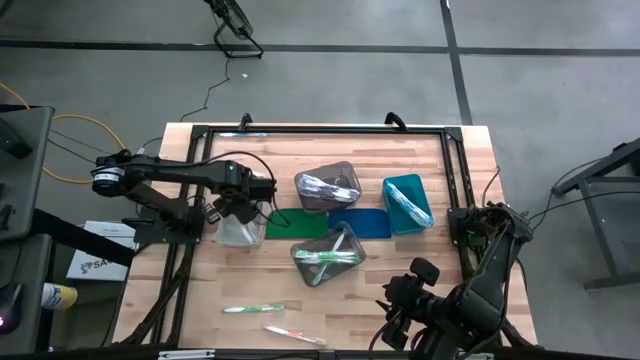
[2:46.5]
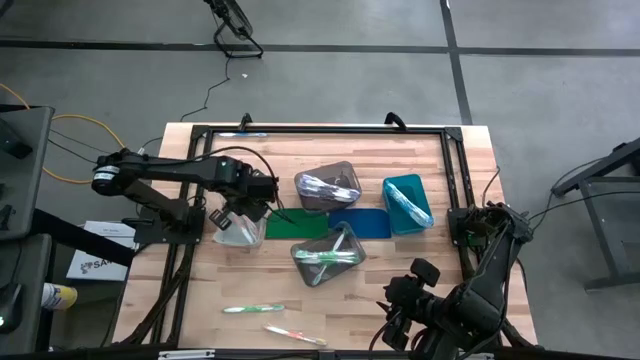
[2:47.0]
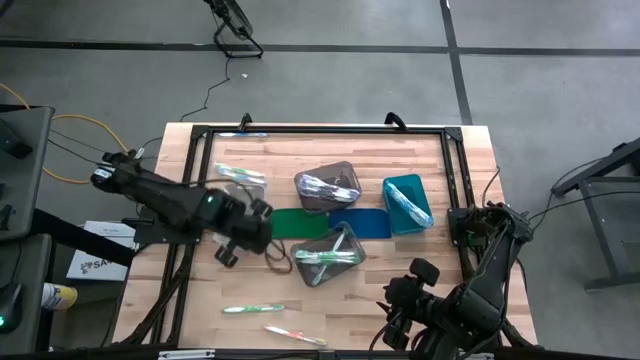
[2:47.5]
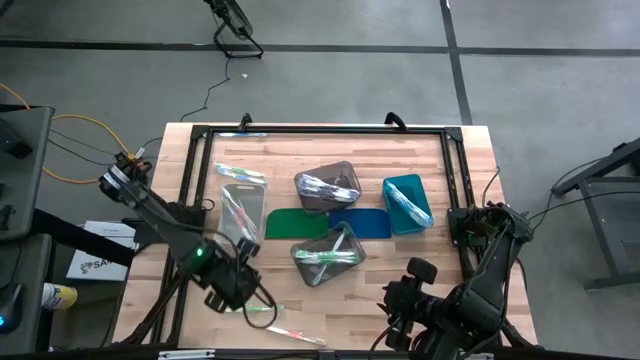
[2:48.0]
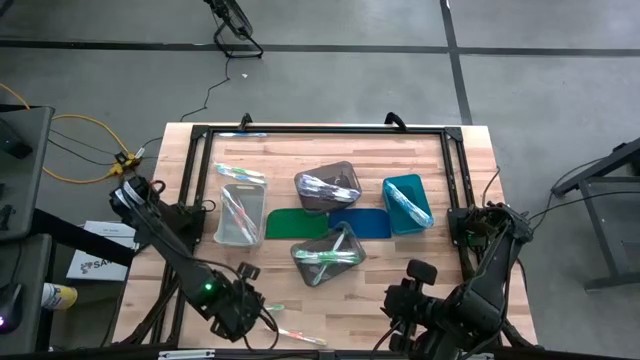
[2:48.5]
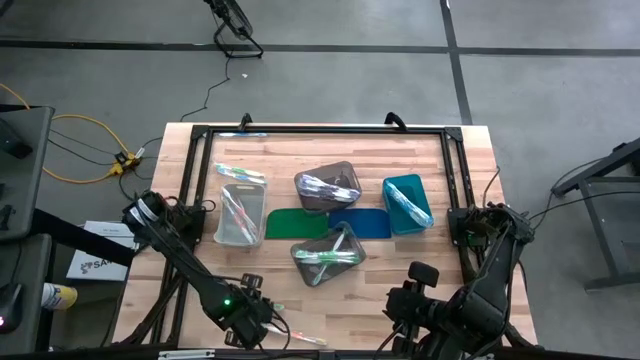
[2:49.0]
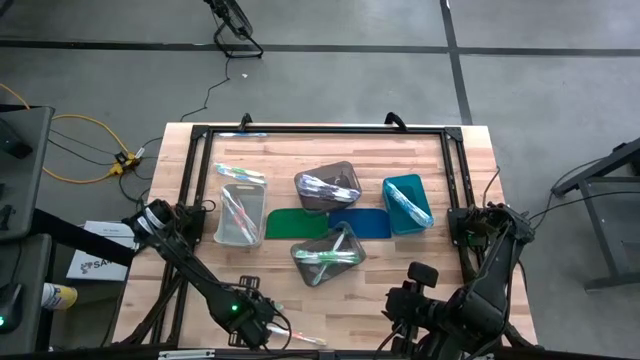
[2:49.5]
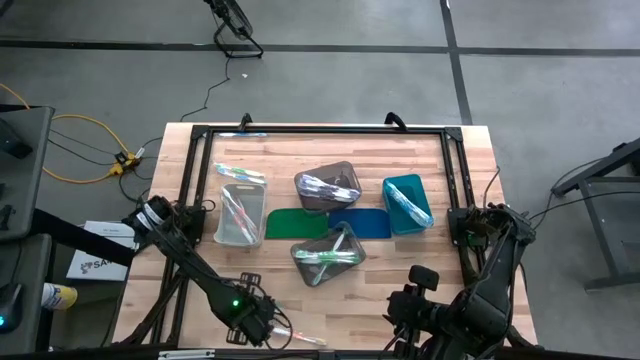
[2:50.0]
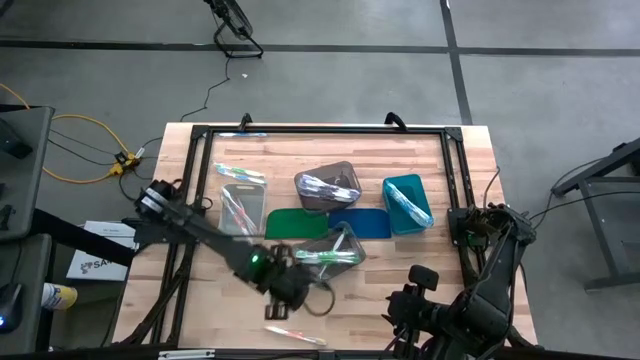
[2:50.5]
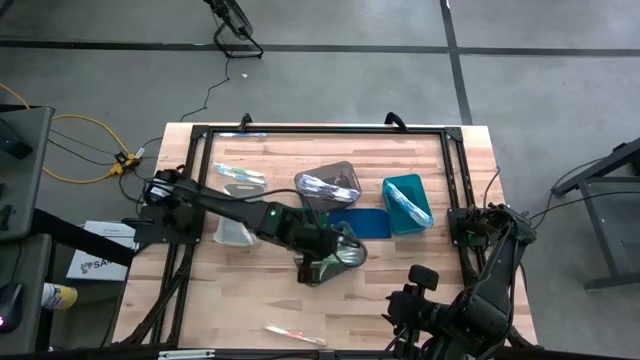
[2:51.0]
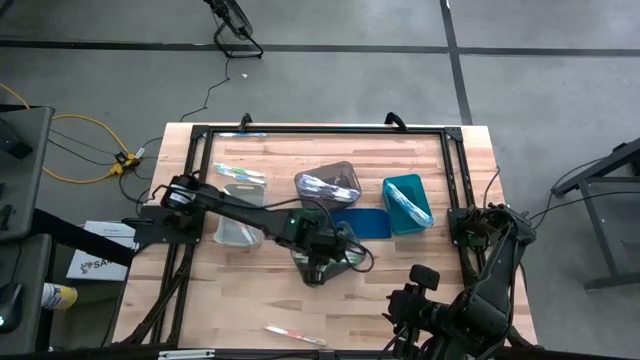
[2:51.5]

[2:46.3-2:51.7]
Task: Pick & Place Toothbrushes
Put the green toothbrush into the bottom black bin

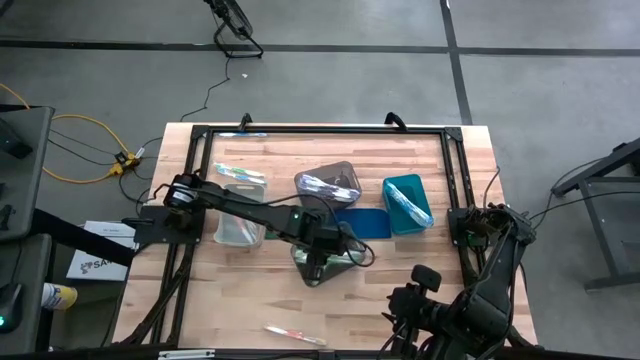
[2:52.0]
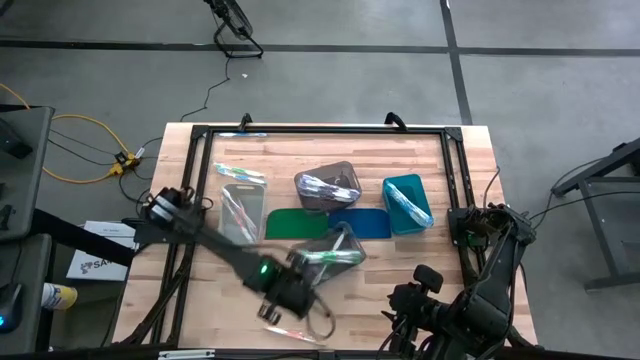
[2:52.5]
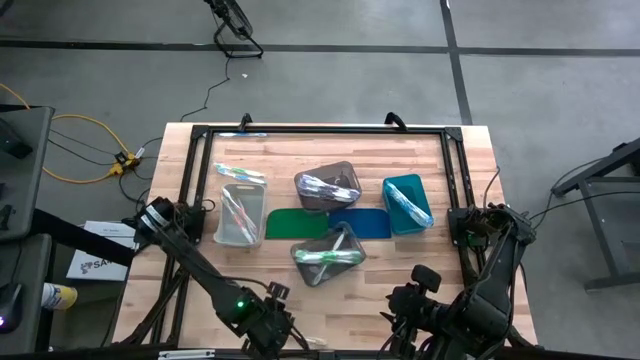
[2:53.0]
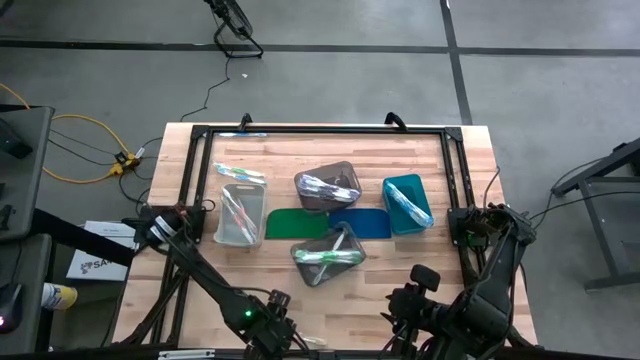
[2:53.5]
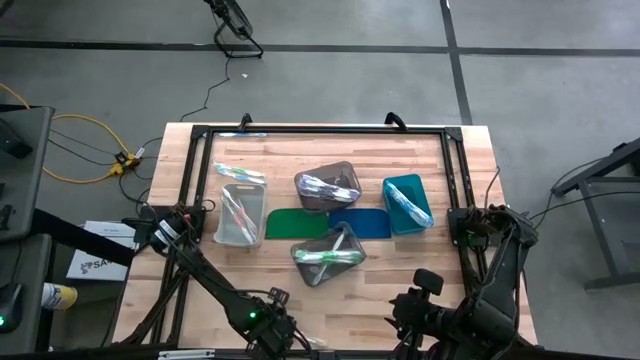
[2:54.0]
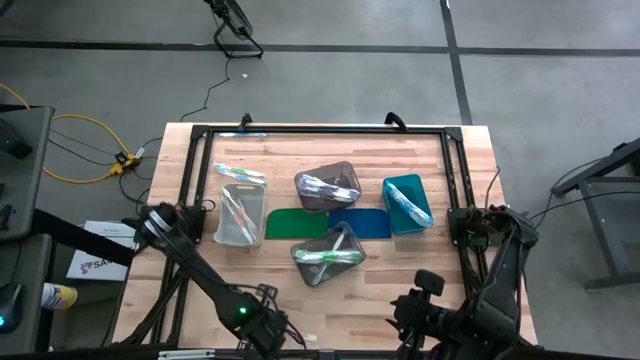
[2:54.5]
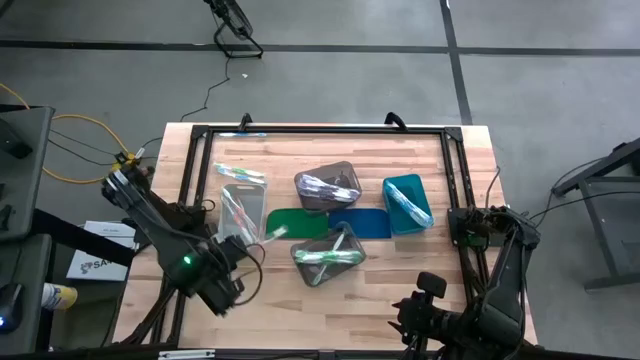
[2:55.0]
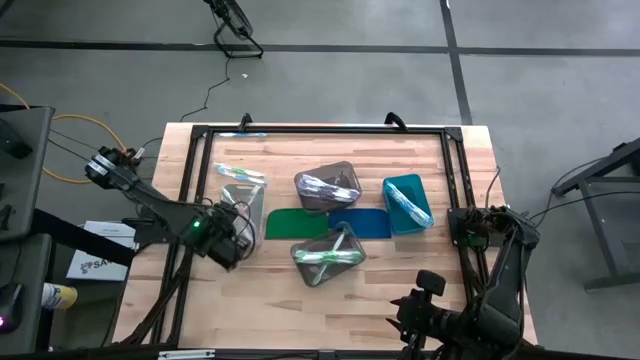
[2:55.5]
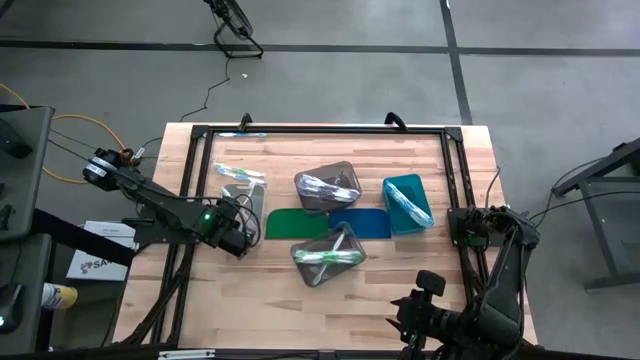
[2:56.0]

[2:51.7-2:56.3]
Put the orange toothbrush into the gray bin

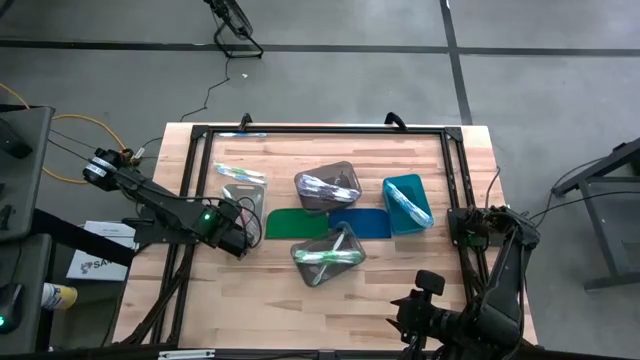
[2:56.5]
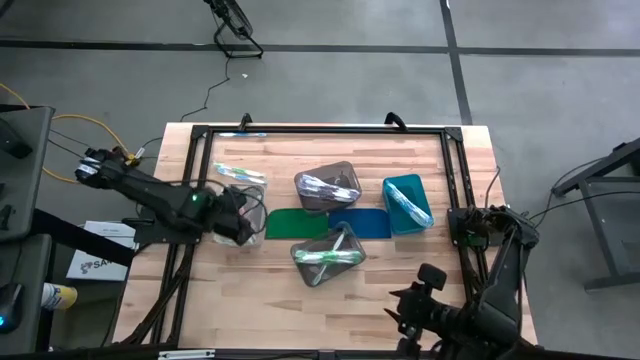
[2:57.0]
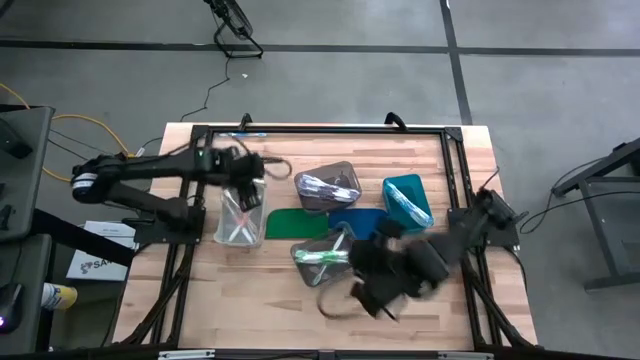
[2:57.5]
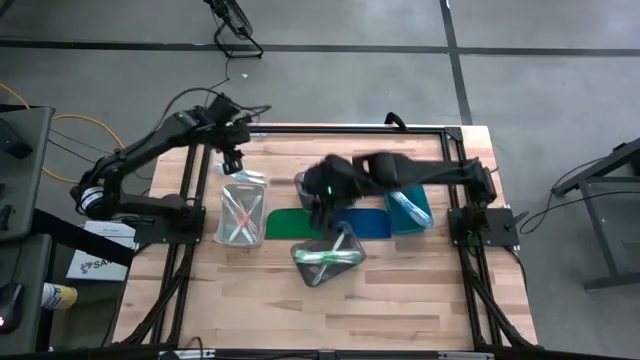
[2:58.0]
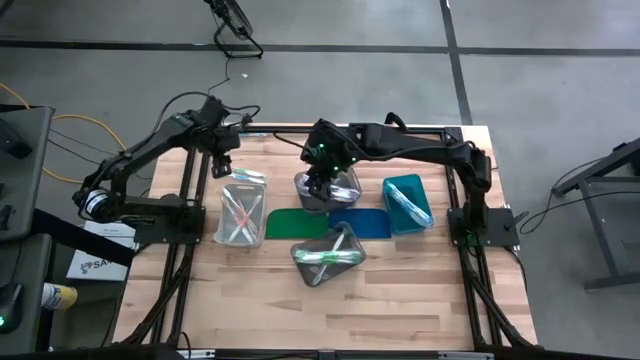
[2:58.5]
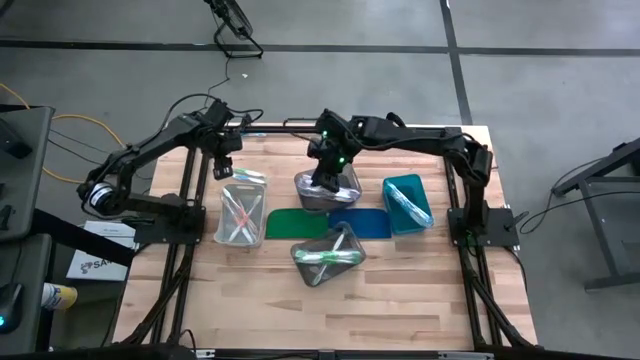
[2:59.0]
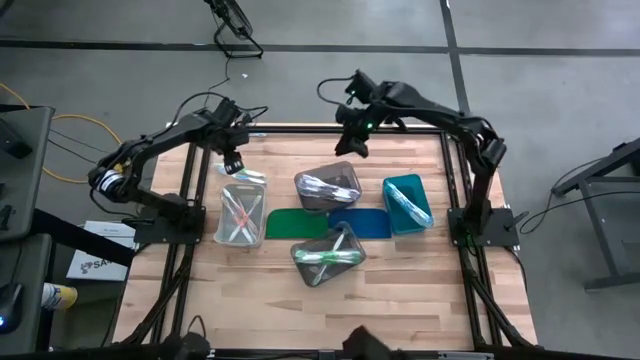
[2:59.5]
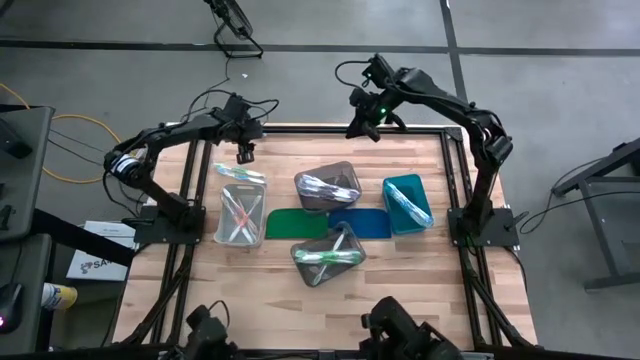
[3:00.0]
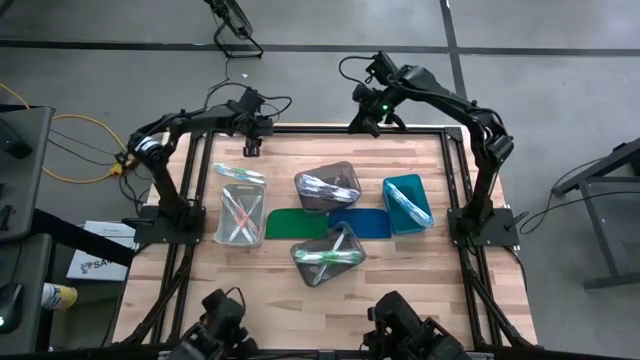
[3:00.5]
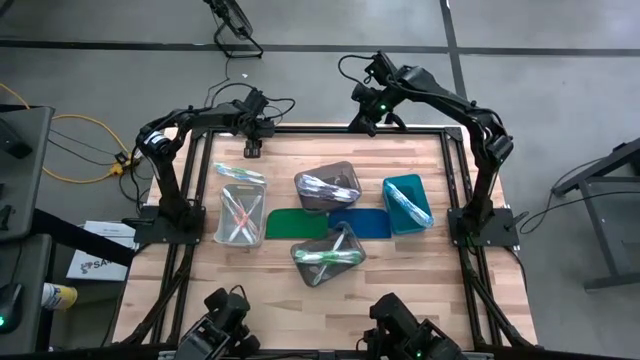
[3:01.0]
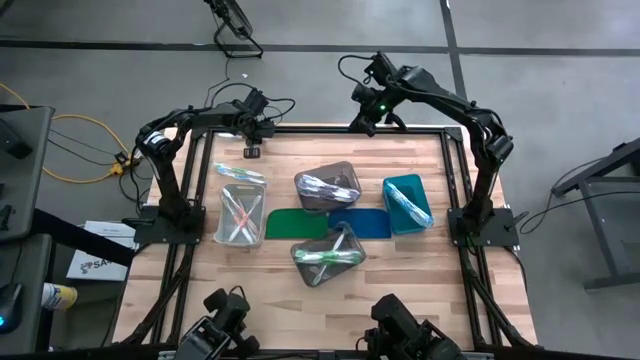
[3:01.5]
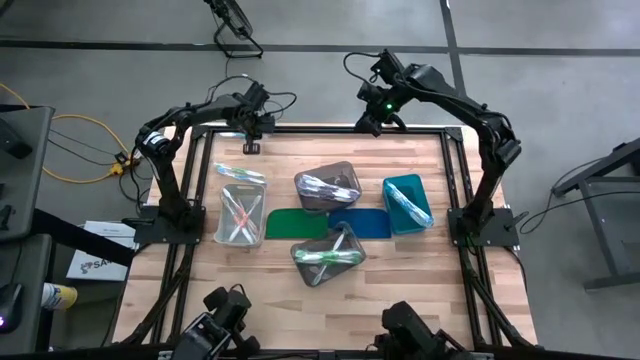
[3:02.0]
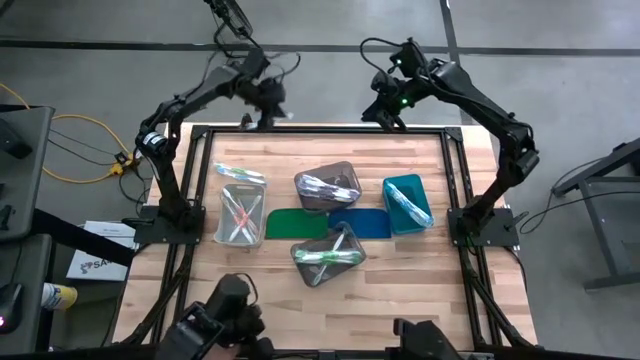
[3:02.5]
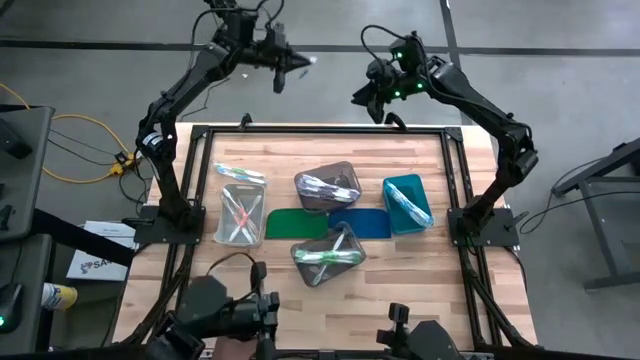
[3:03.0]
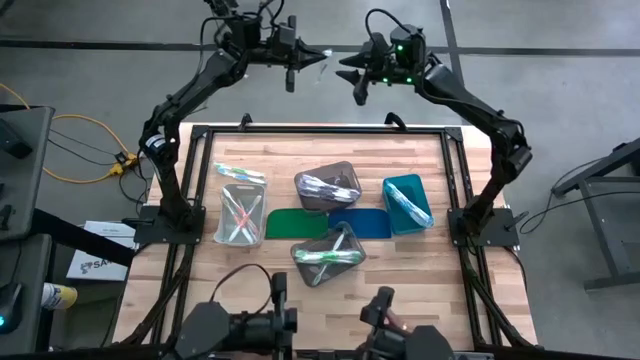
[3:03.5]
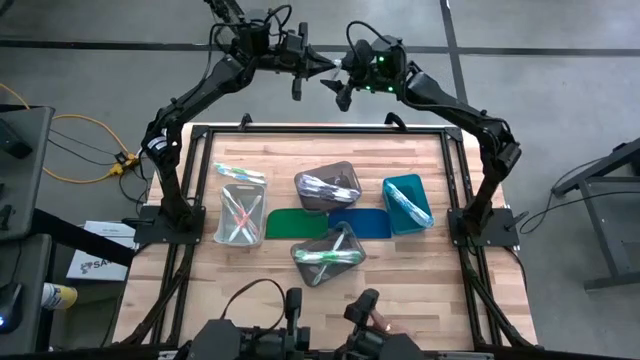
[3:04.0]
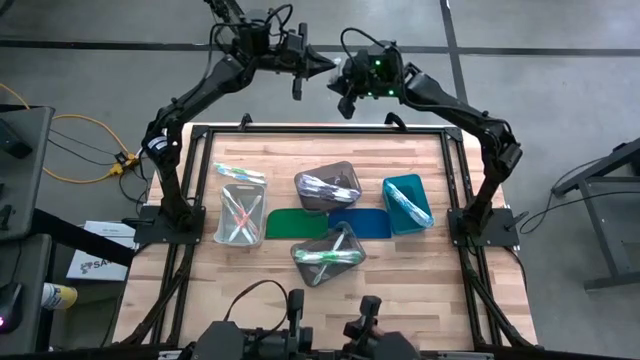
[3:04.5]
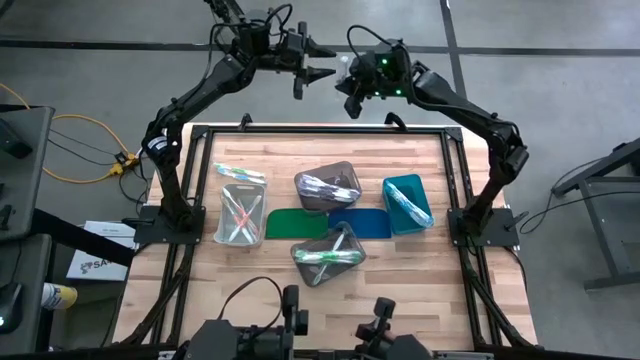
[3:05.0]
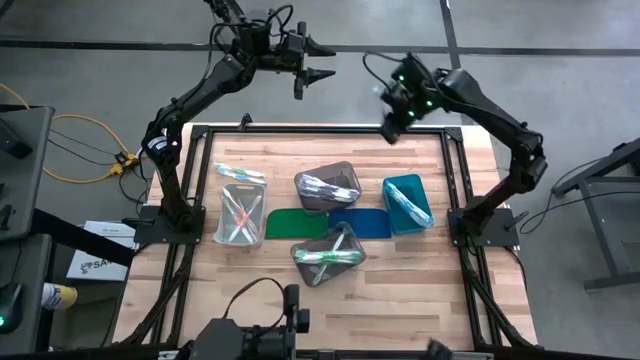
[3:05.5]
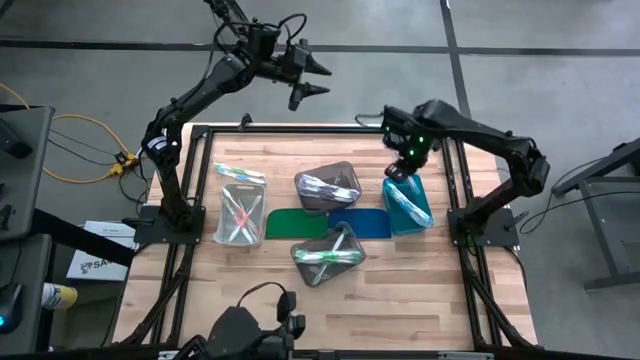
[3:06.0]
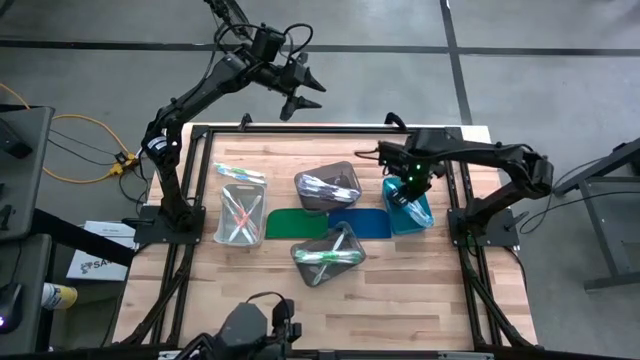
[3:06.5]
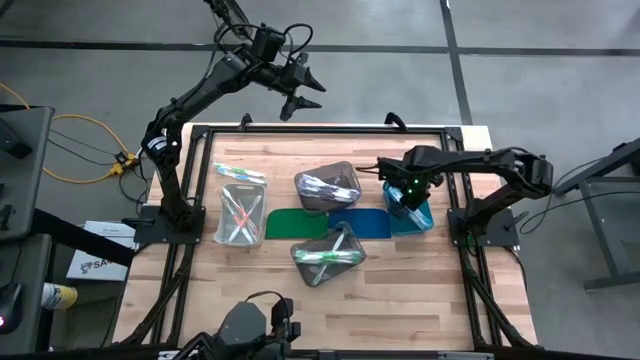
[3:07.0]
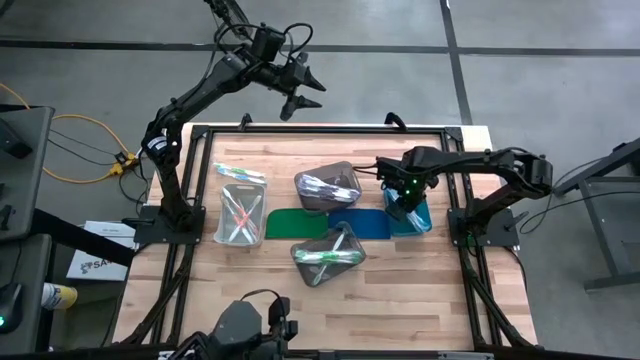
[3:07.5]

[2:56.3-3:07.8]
Put the blue toothbrush into the blue bin
